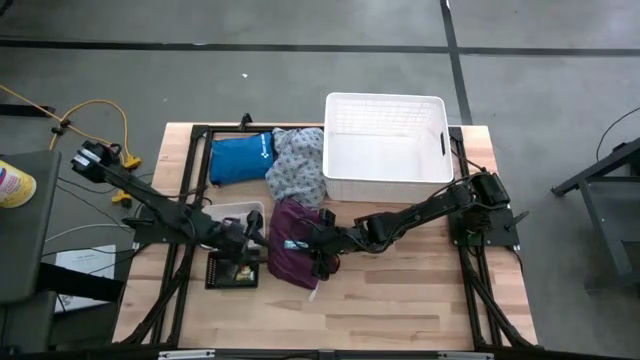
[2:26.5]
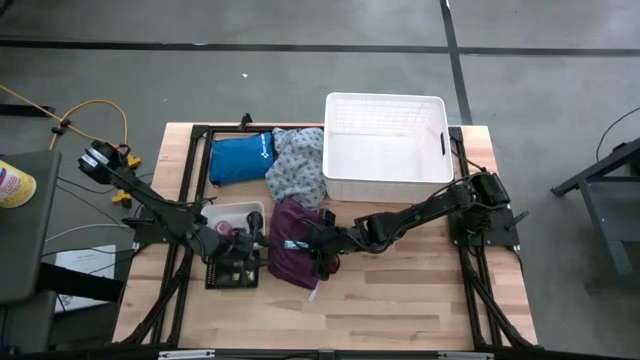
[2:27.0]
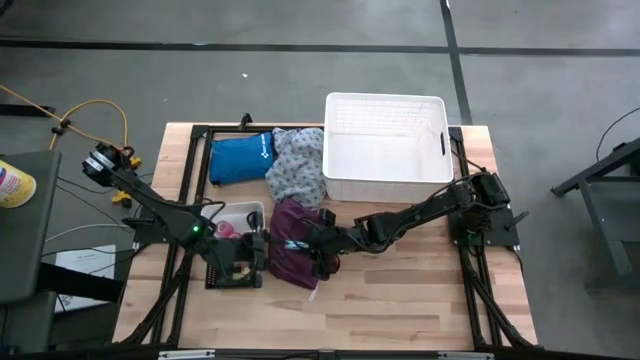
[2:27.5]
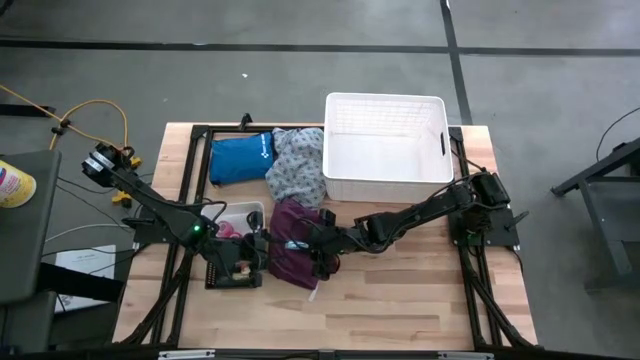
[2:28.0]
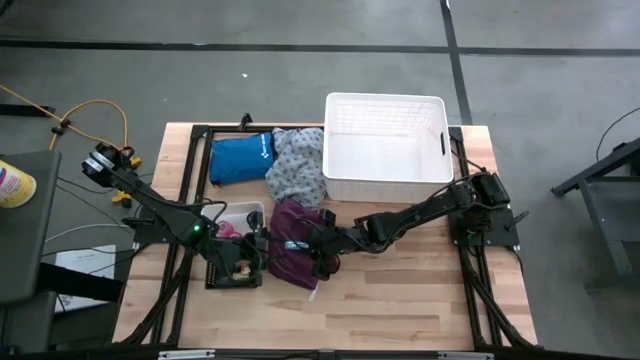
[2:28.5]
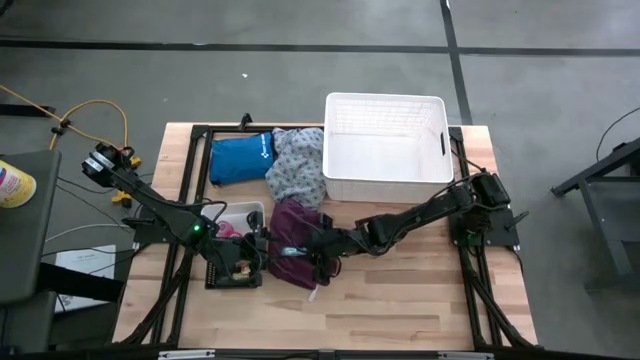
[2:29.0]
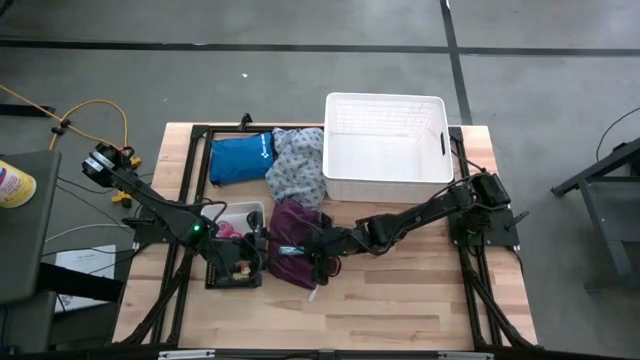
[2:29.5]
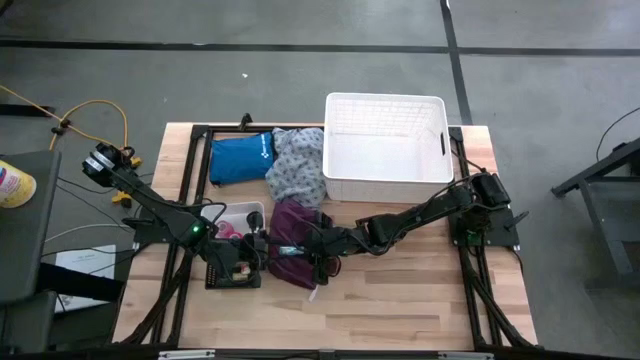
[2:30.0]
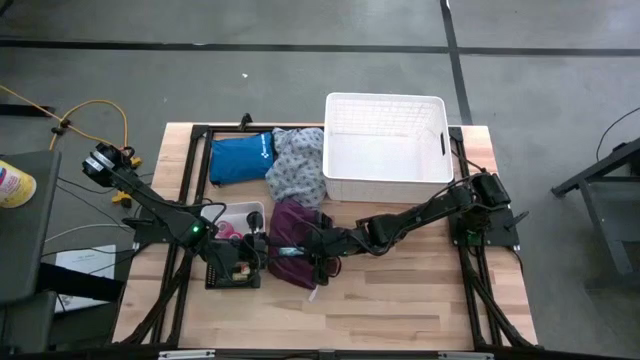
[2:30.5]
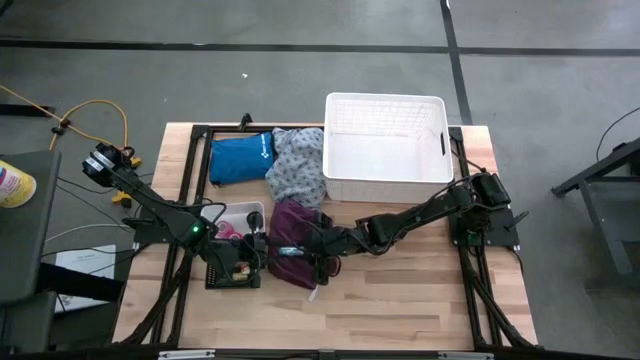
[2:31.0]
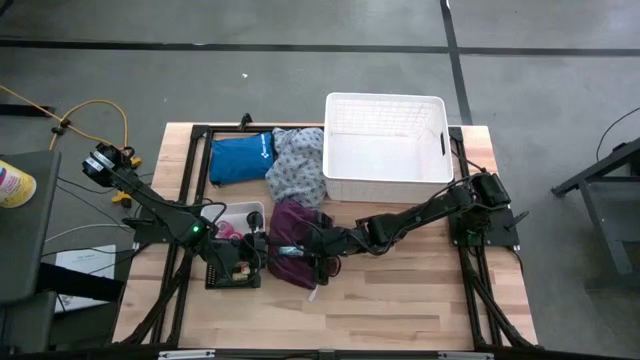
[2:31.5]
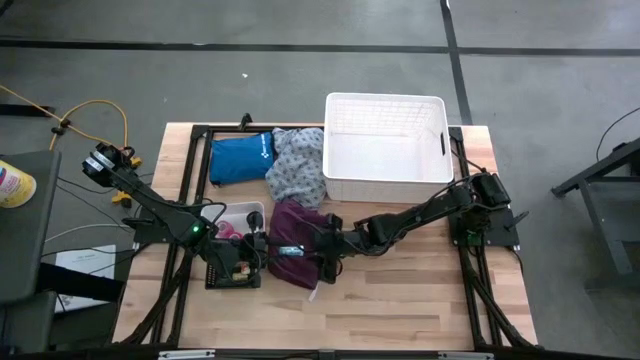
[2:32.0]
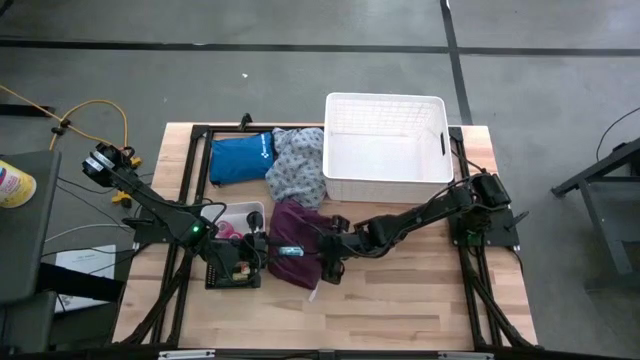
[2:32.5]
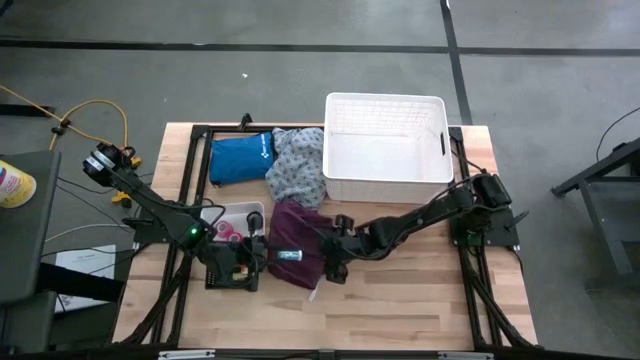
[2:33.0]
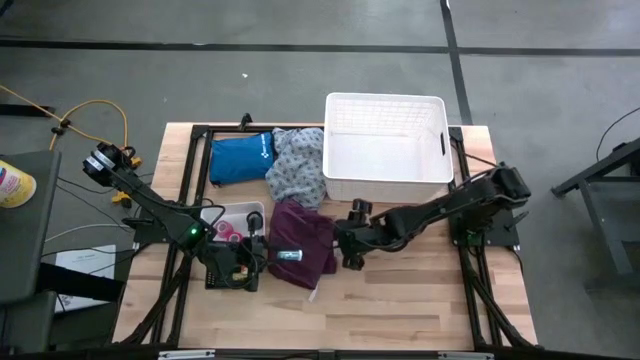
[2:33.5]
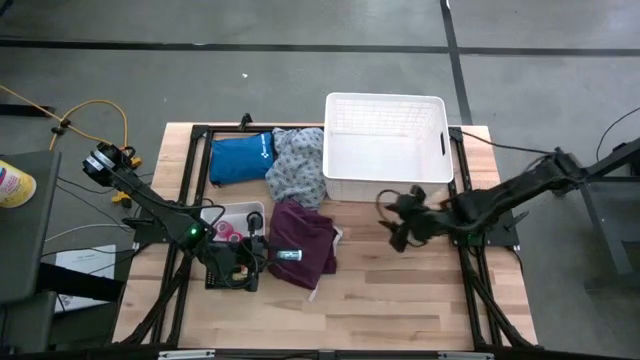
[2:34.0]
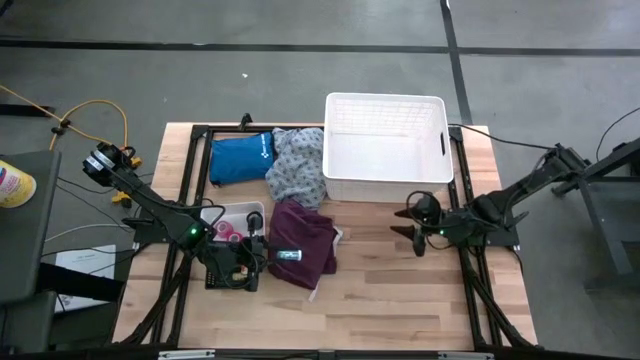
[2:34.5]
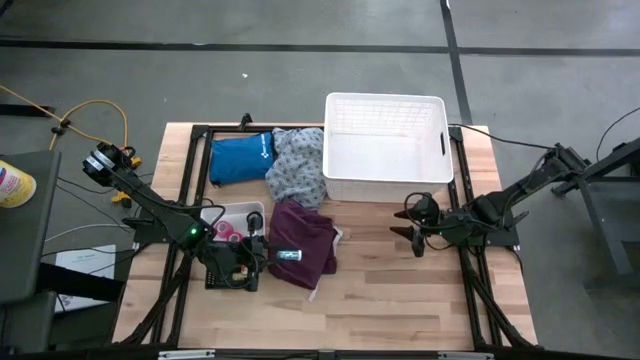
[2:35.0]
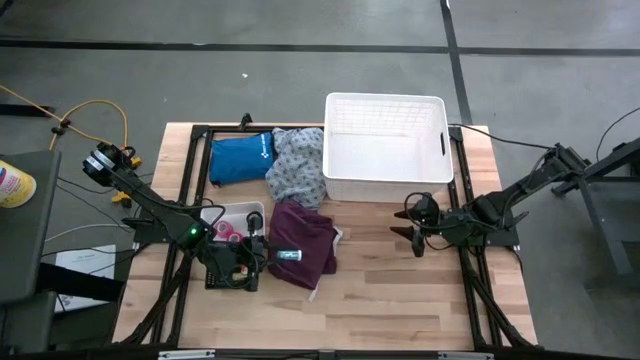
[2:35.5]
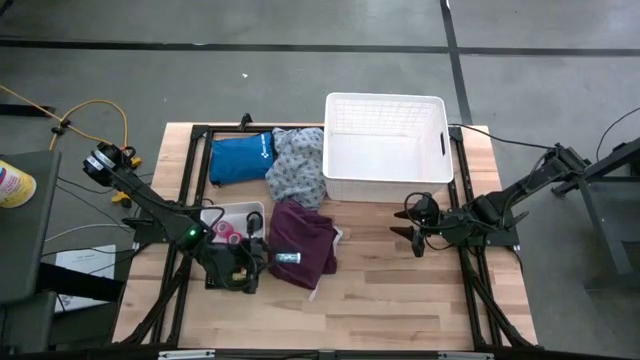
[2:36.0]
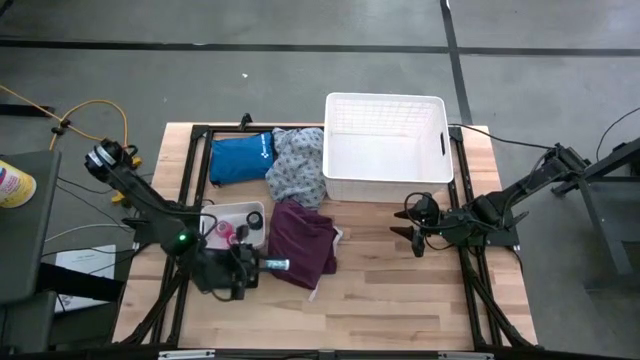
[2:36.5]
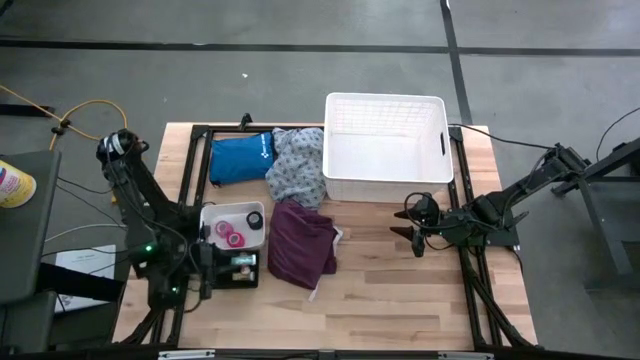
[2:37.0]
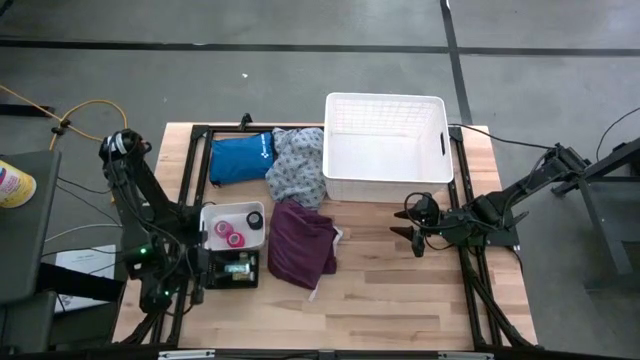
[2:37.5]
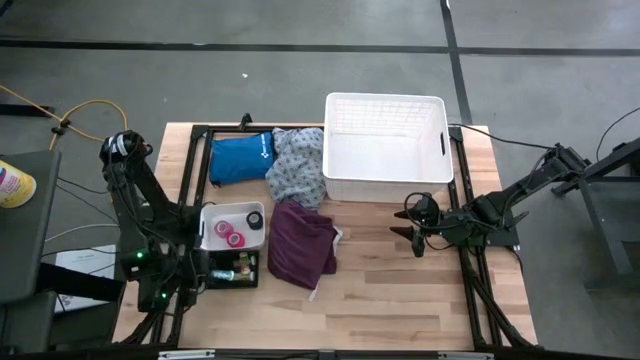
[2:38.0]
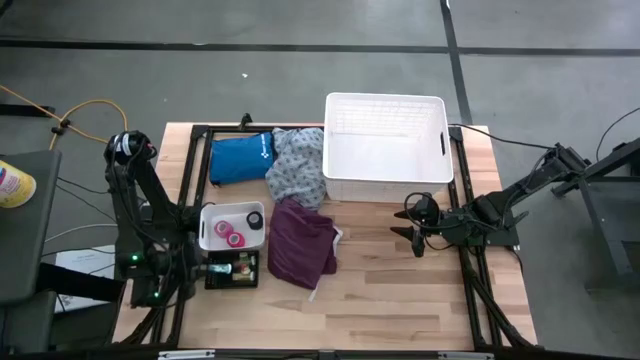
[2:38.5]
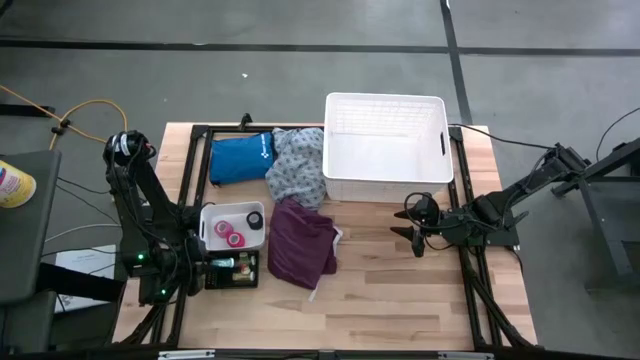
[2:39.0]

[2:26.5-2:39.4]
Task: Pick & place medical supplies in basket/bin
Put the blue pill bottle into the black bin

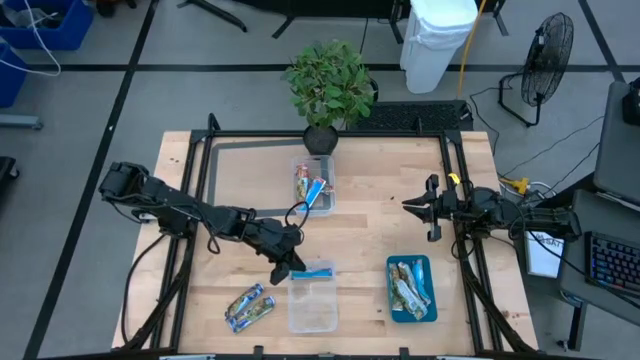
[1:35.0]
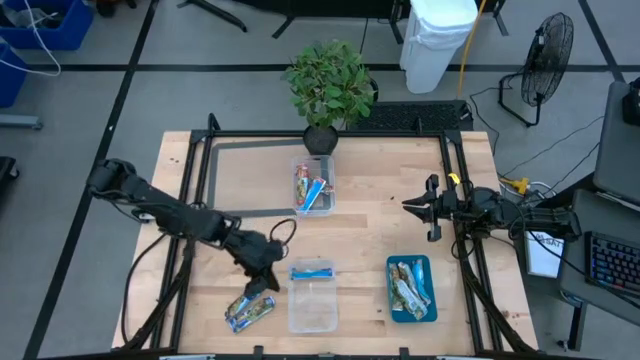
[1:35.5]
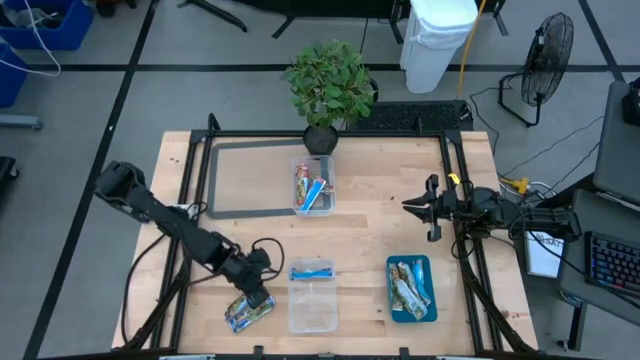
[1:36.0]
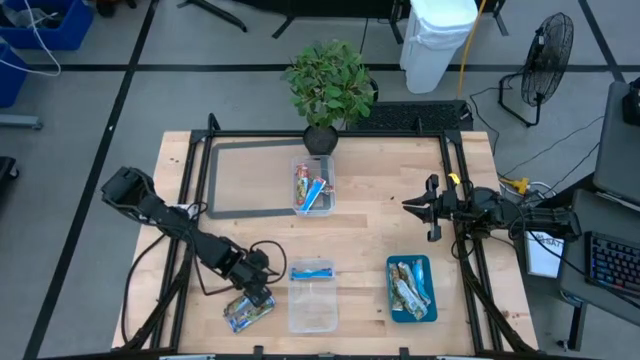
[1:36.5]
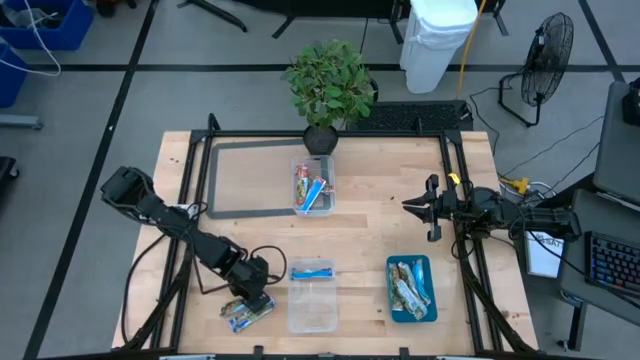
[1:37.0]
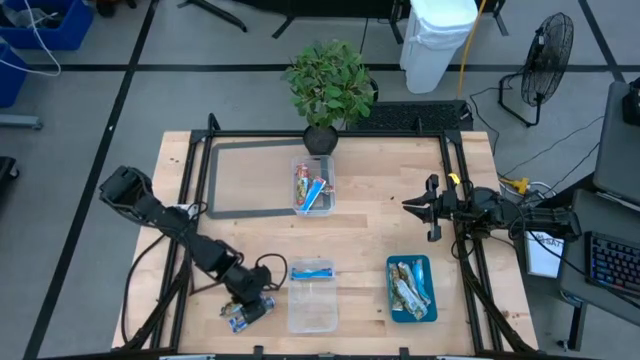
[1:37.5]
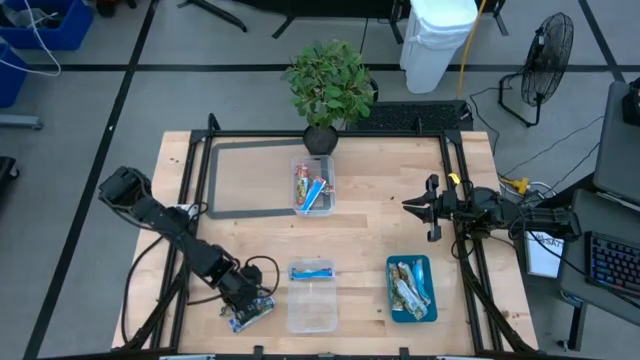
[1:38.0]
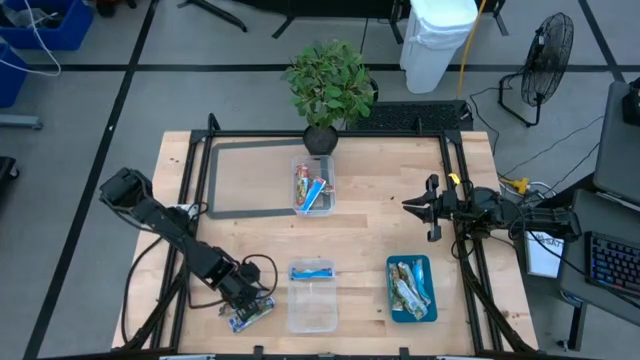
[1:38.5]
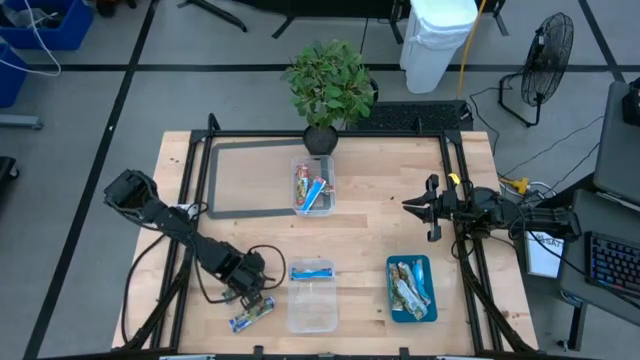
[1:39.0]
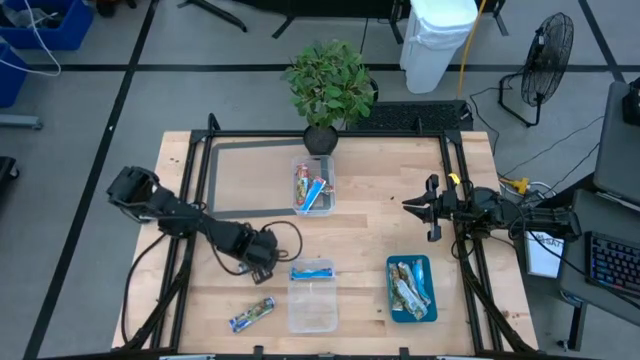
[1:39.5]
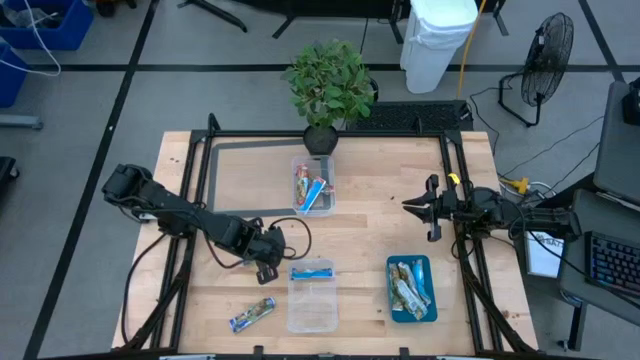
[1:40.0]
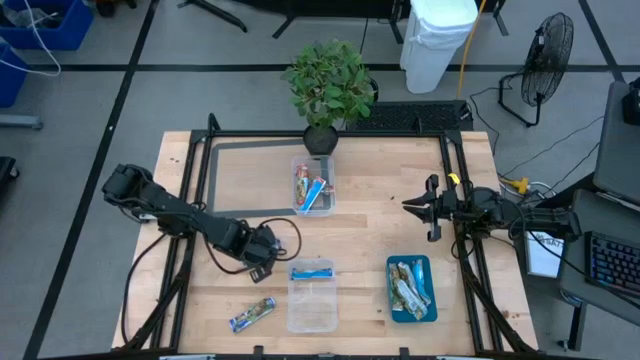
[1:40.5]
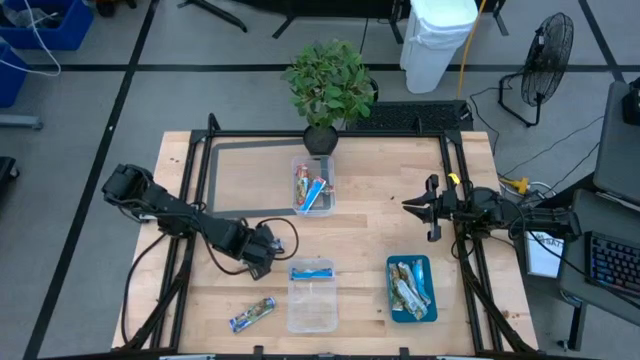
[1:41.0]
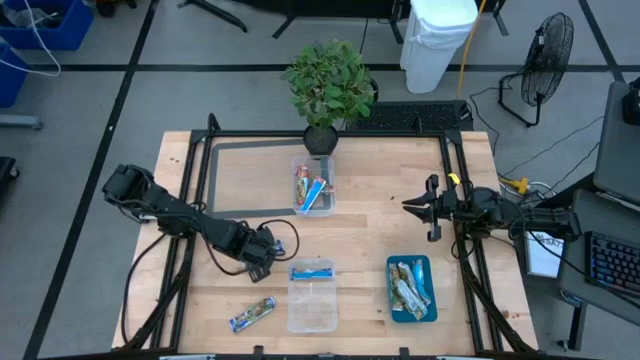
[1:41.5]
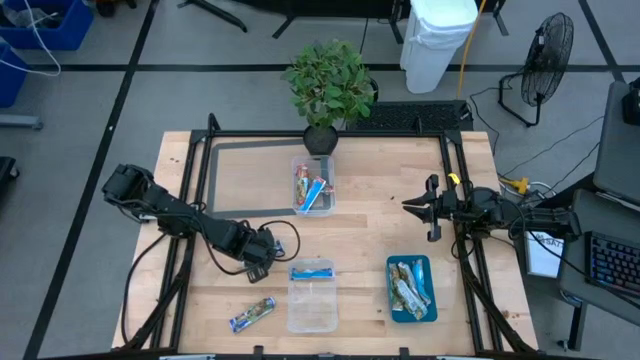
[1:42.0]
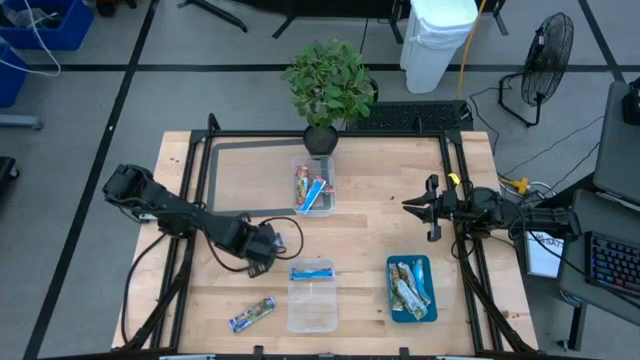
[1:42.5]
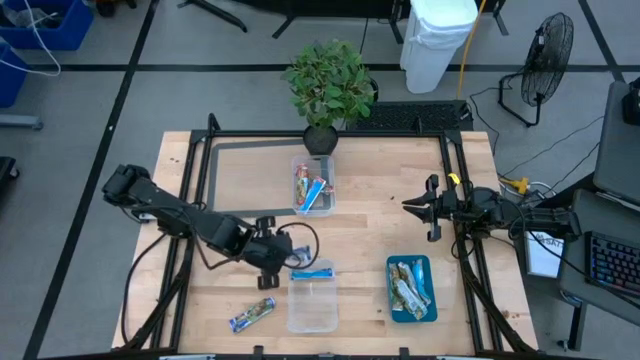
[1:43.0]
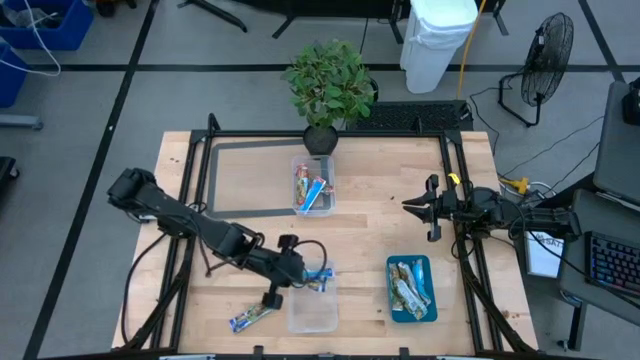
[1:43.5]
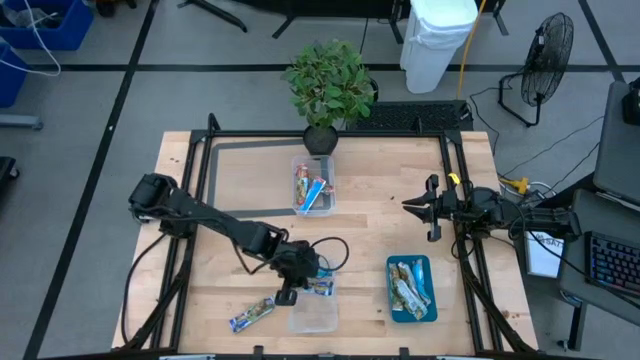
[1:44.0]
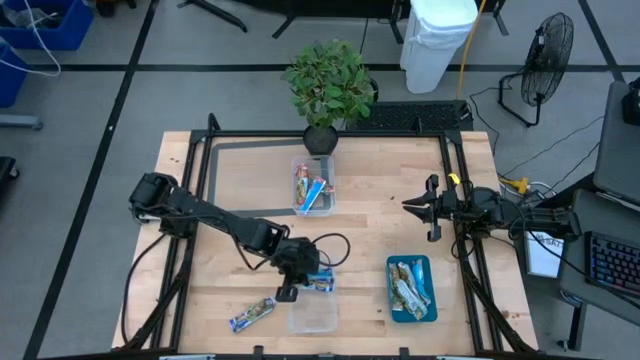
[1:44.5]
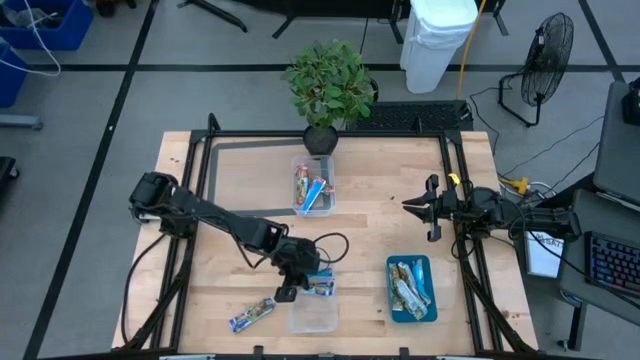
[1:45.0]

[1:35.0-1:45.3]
Task: Pick and place Granola Bars by type
Put the blue granola bar into the bottom transparent bin
